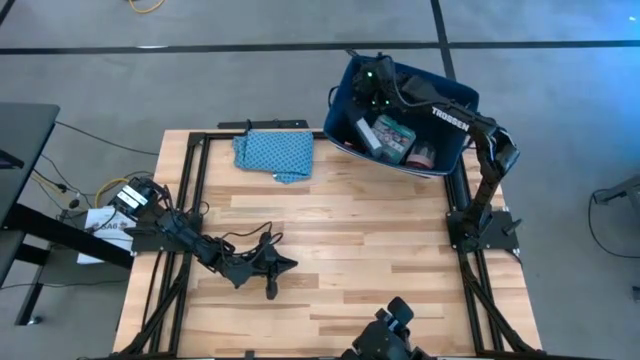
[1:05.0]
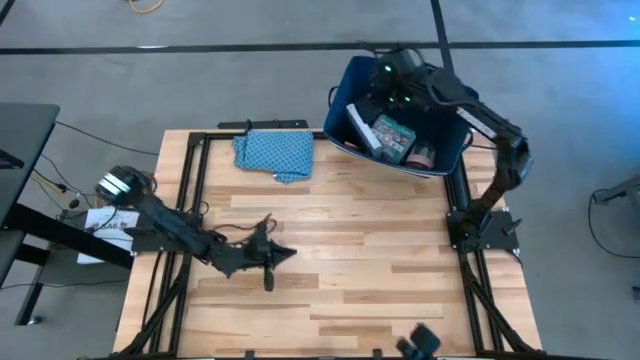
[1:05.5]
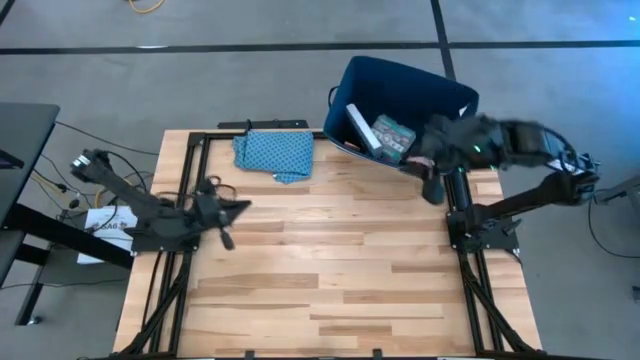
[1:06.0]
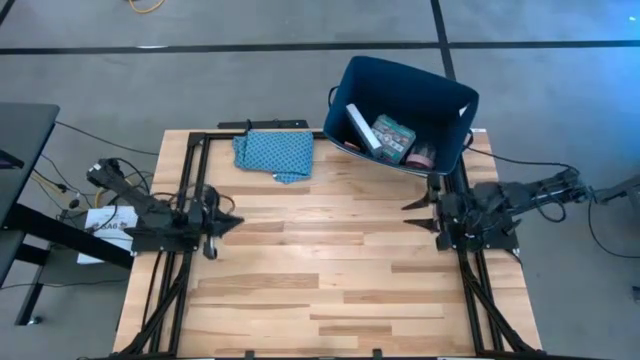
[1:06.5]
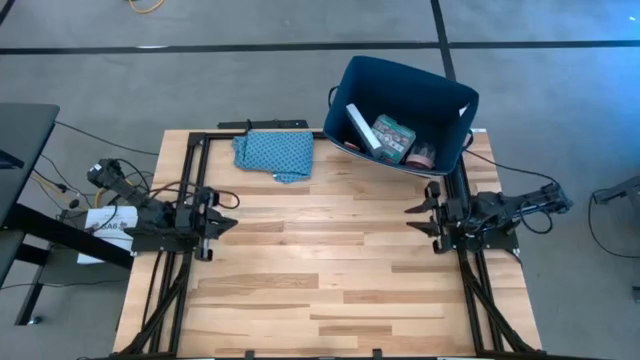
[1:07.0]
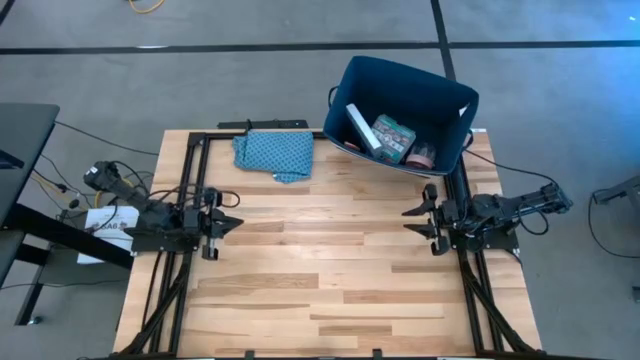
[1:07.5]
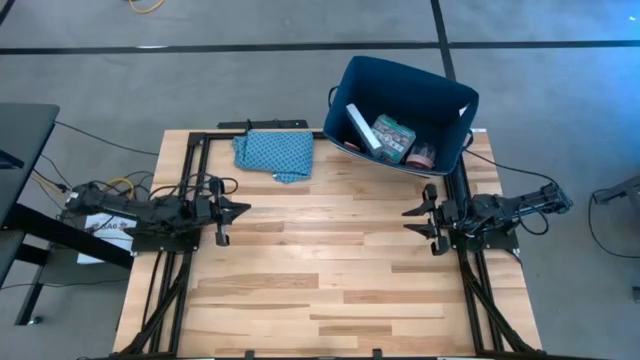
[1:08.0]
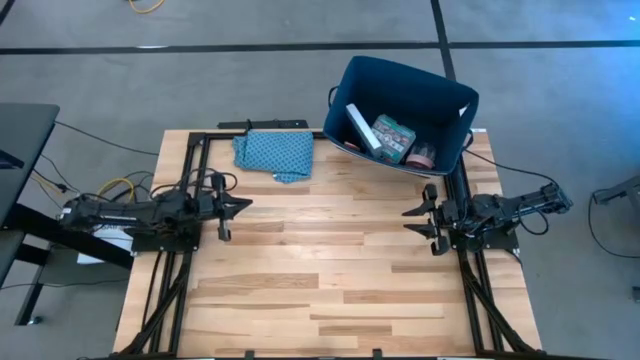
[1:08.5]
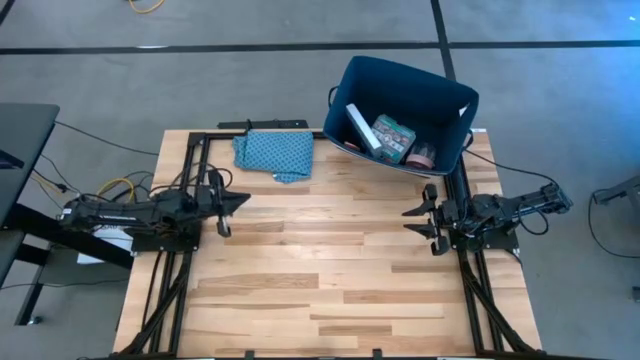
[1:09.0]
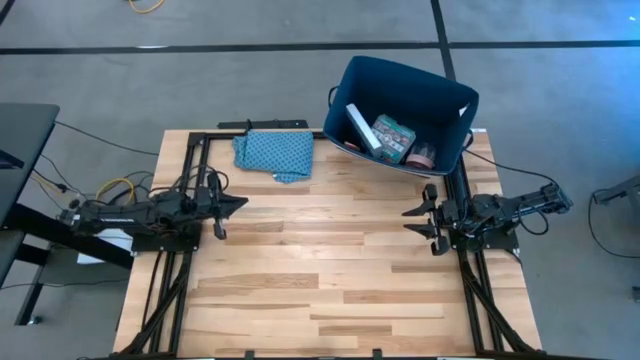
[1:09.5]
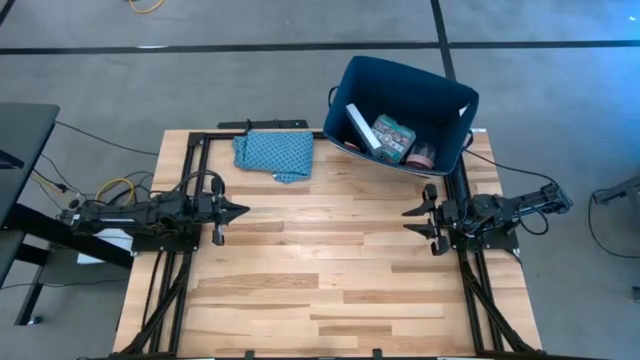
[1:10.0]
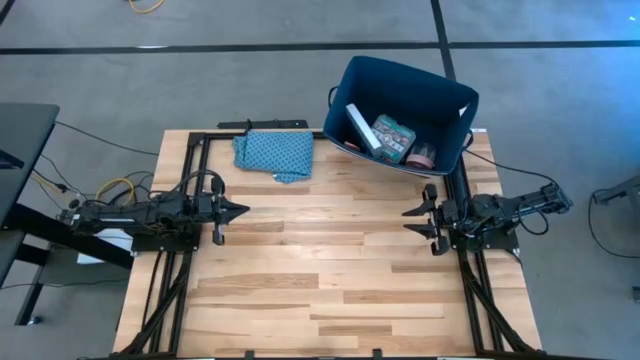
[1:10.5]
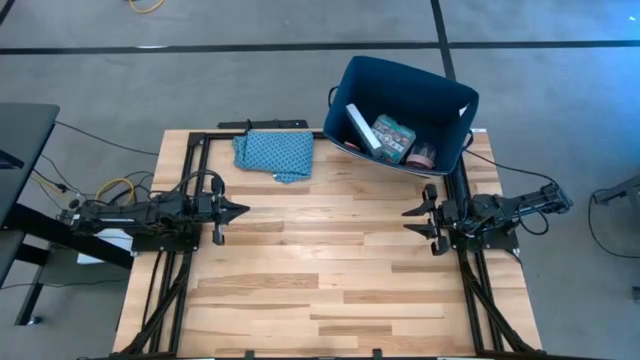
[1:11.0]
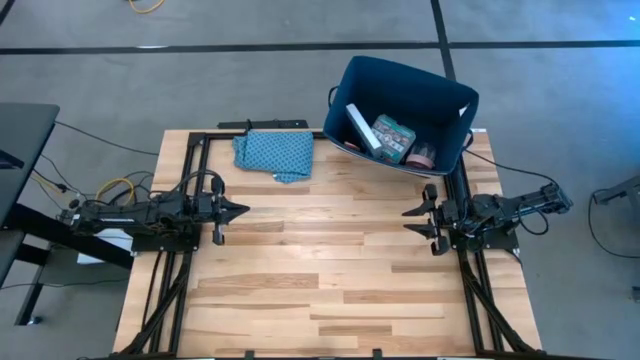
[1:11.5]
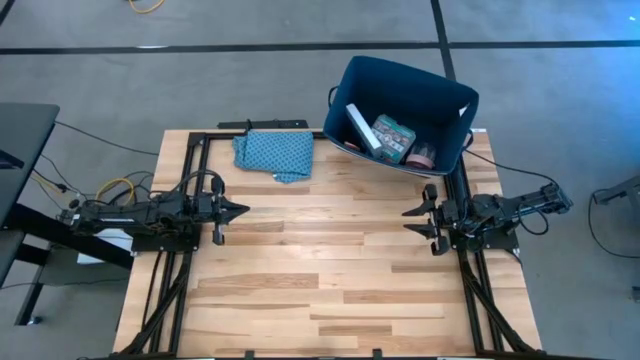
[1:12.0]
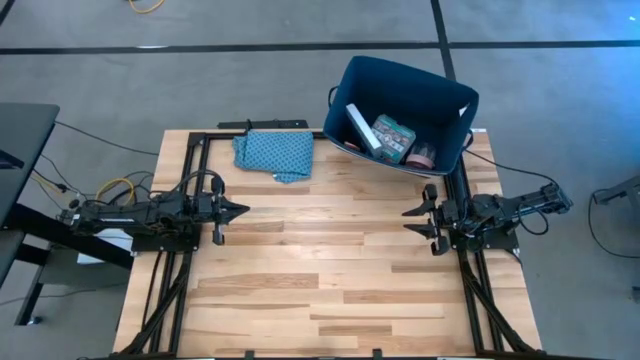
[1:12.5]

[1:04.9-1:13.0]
Task: Pick & place medical supplies in basket/bin
Return to Home Position

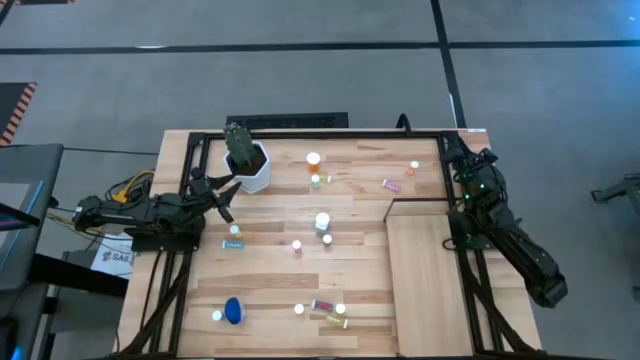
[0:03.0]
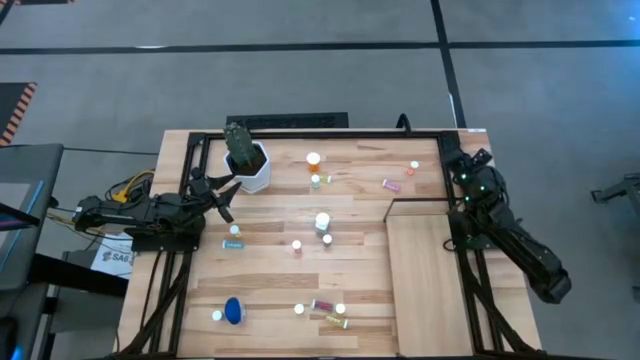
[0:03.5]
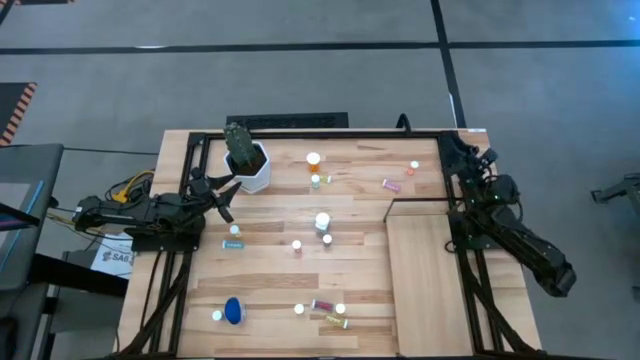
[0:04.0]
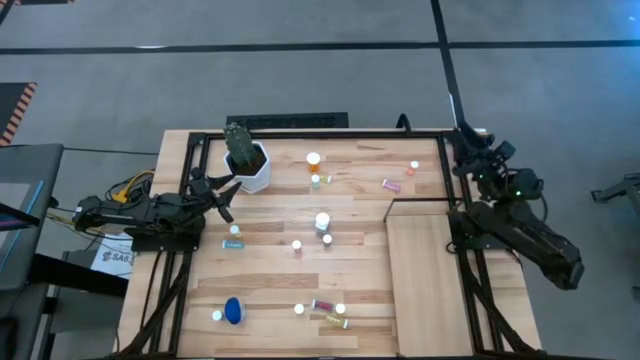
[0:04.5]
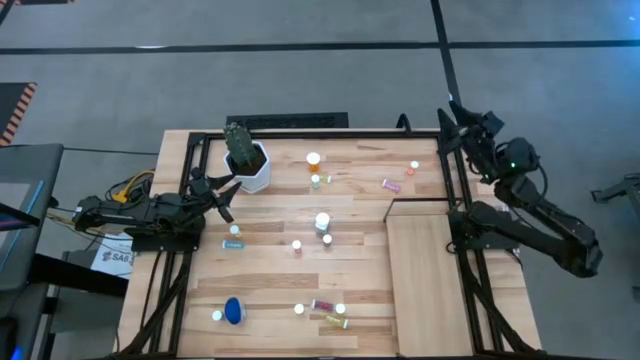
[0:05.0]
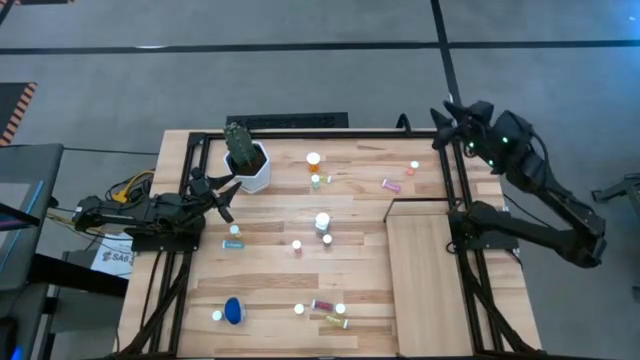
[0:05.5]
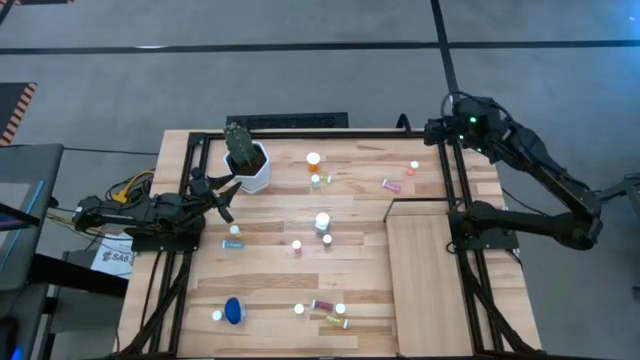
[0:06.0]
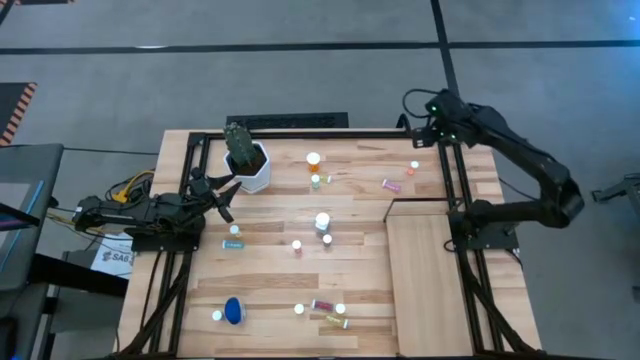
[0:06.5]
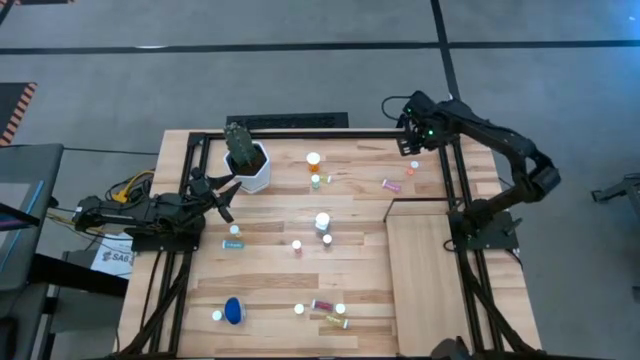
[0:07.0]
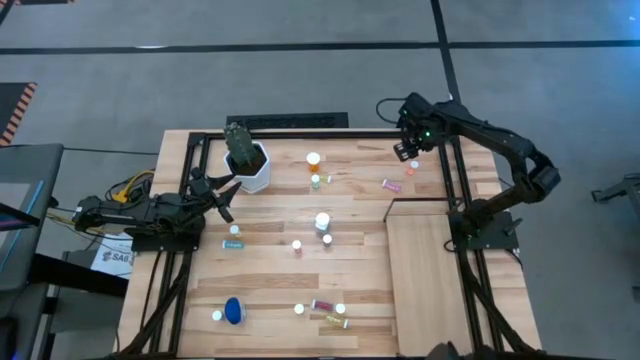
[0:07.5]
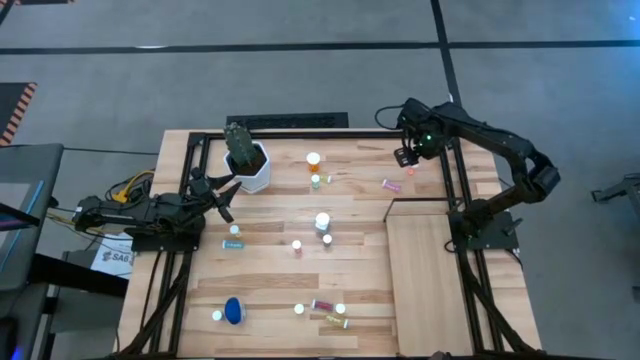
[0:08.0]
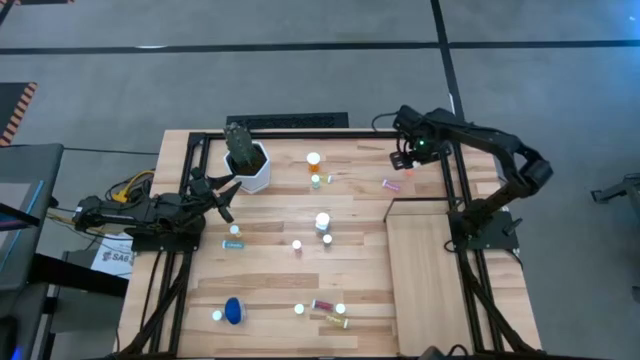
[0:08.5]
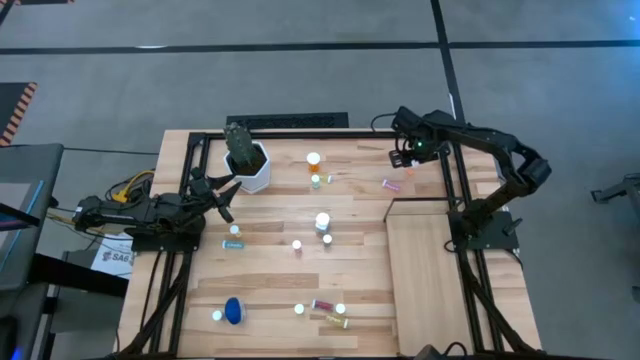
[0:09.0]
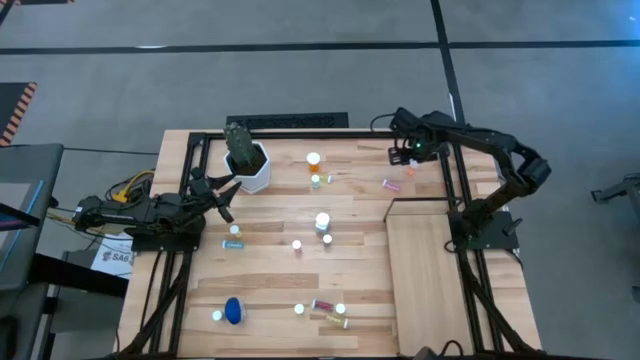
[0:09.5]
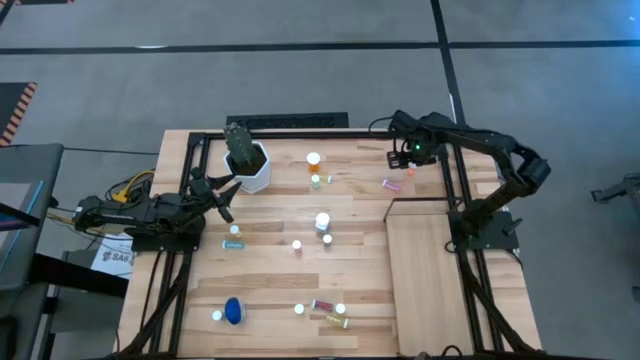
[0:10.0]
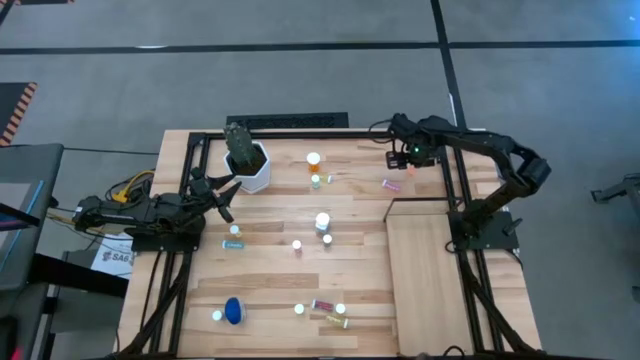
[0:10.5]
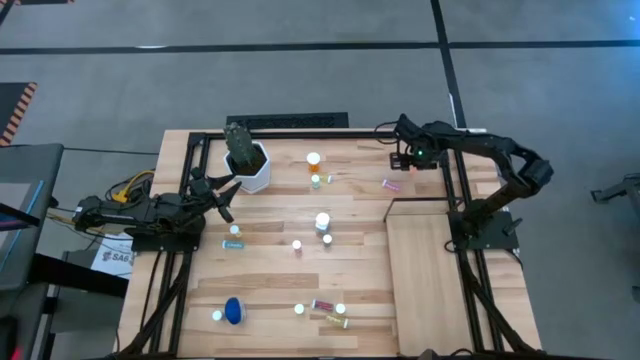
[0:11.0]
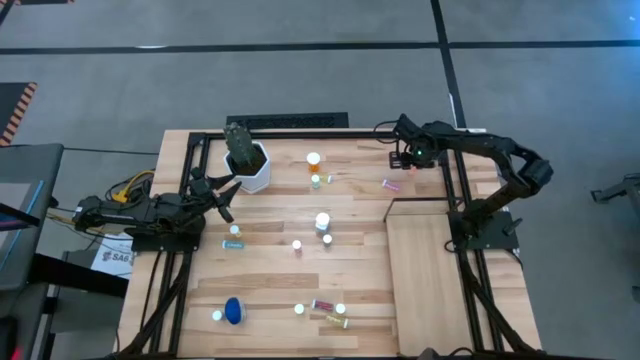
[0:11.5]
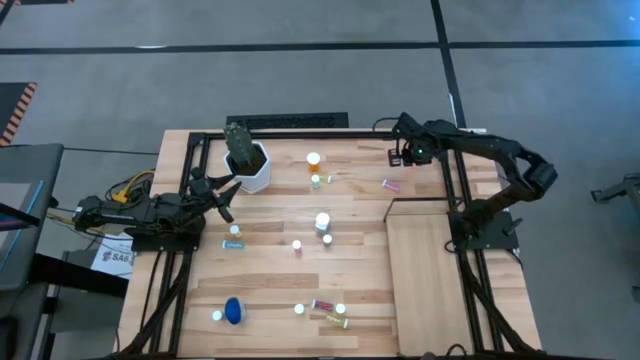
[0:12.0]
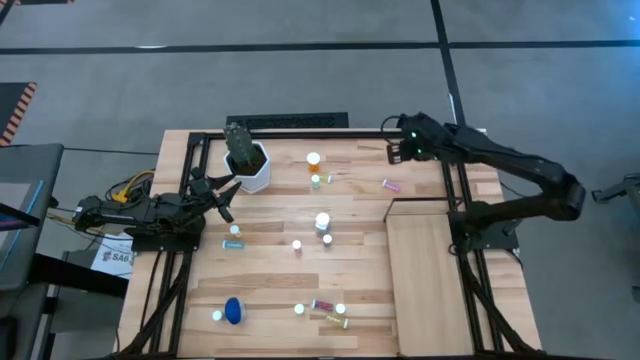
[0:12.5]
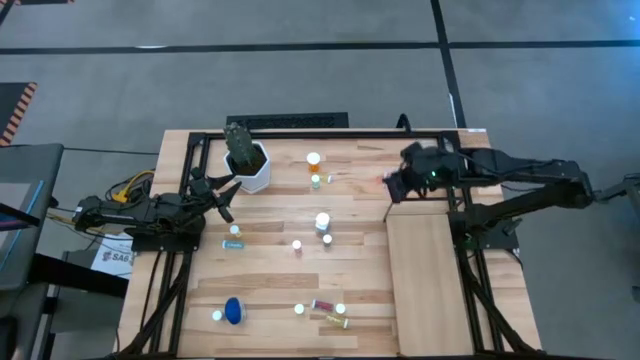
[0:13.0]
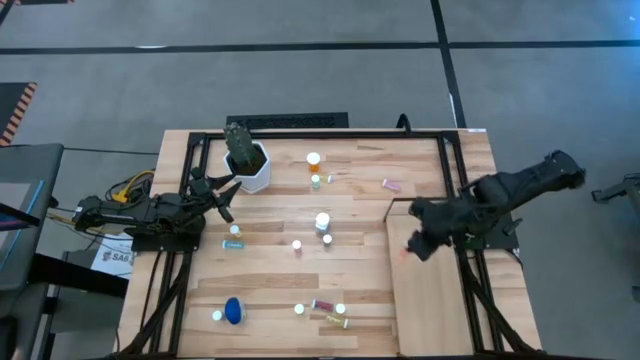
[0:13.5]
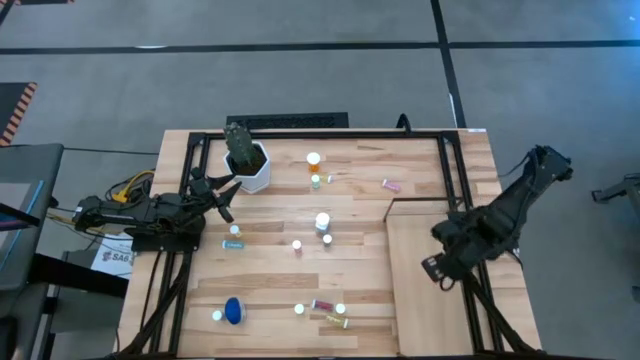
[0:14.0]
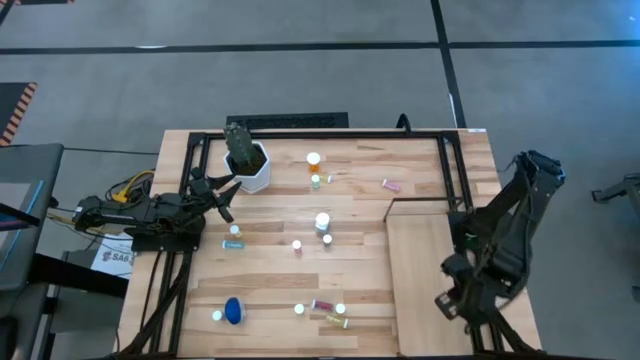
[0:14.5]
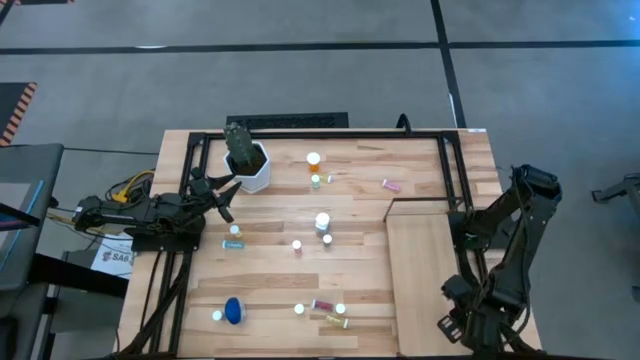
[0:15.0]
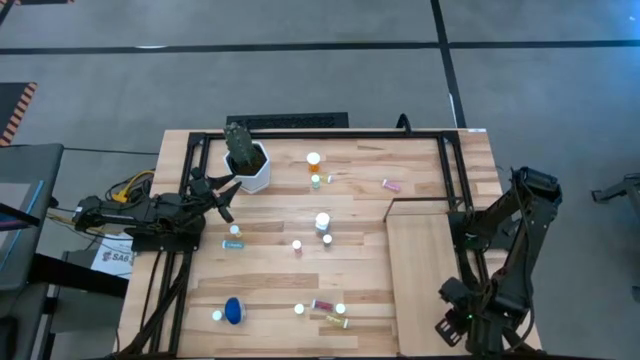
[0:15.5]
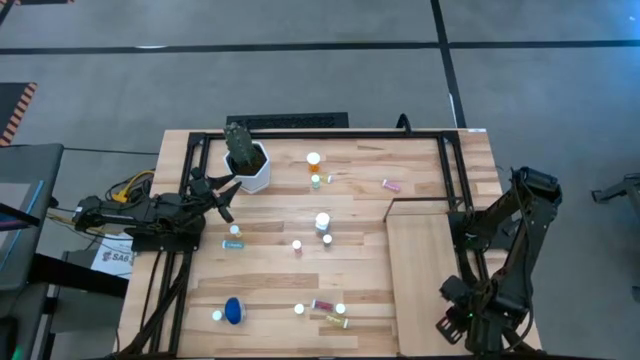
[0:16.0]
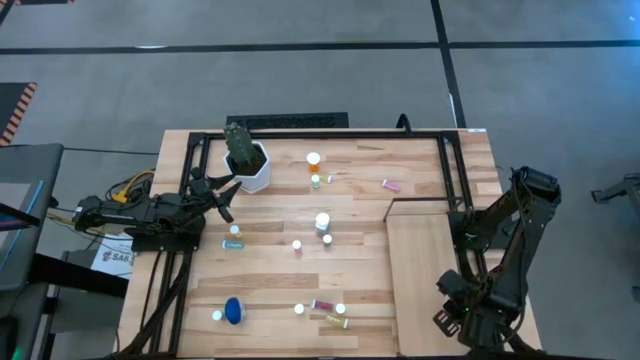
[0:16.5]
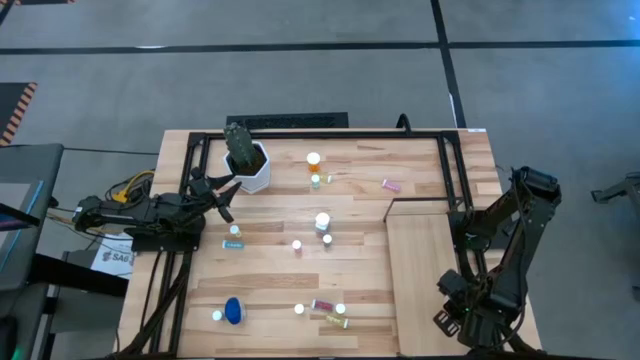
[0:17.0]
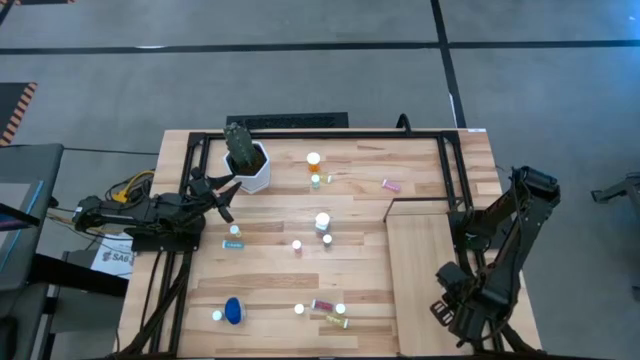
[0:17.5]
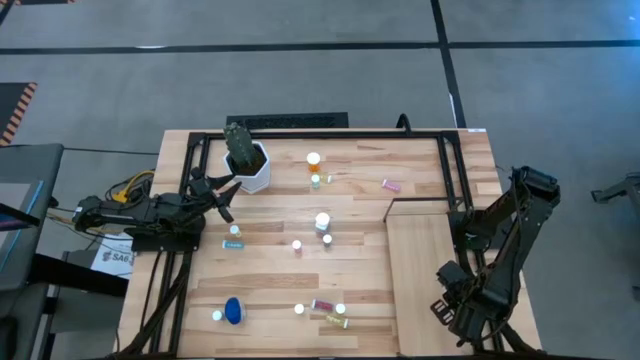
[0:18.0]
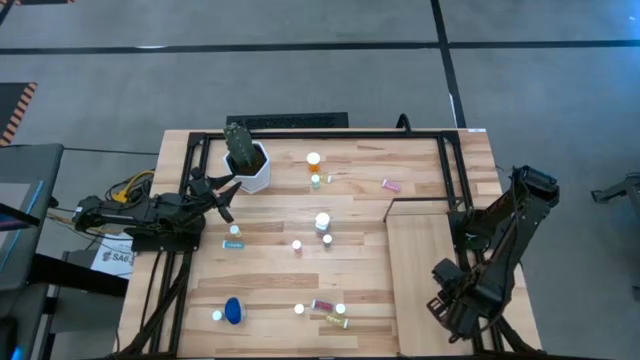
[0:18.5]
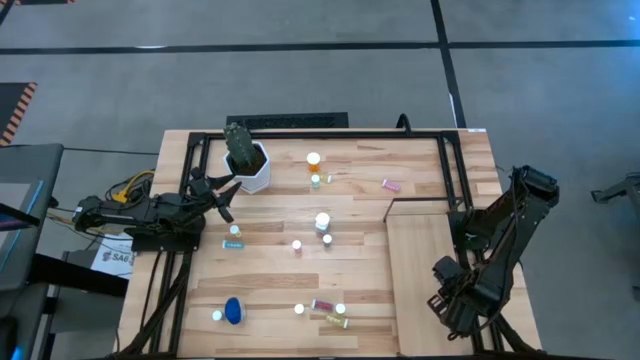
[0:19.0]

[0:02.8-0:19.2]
Task: Pick and place medicine bottles onto shelf by color
Put the small orange pill bottle on the shelf
